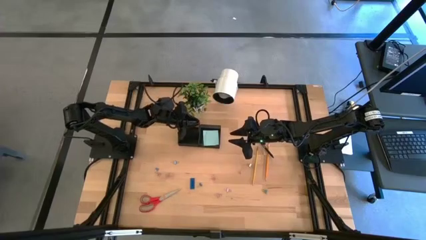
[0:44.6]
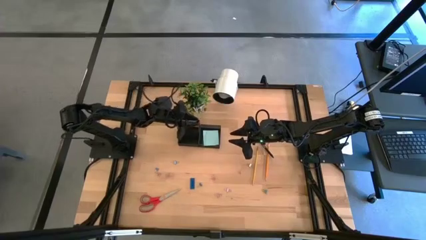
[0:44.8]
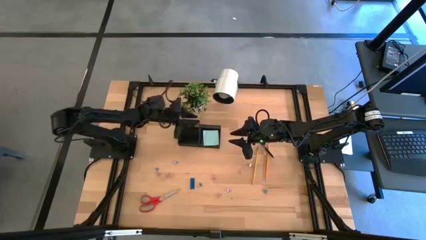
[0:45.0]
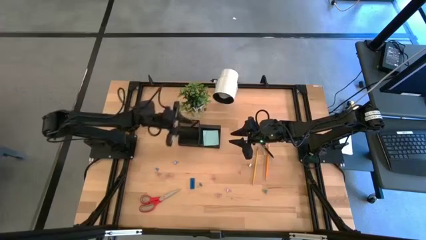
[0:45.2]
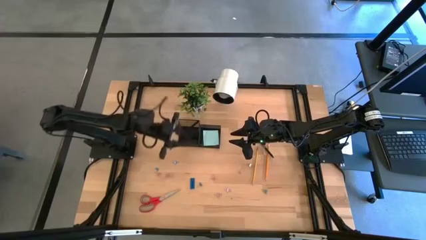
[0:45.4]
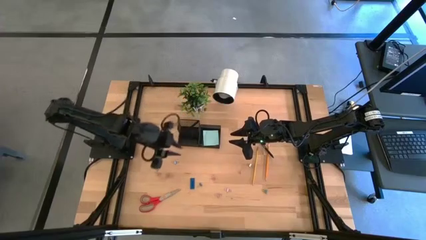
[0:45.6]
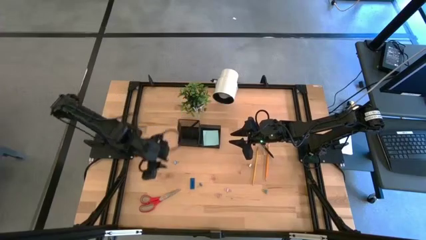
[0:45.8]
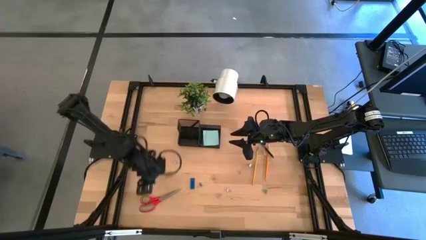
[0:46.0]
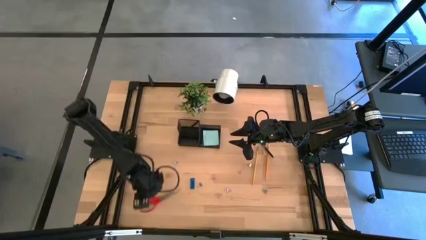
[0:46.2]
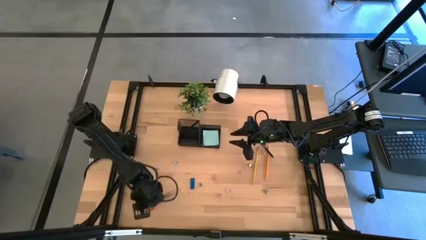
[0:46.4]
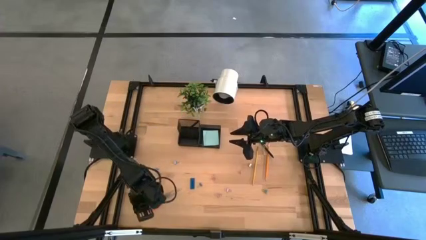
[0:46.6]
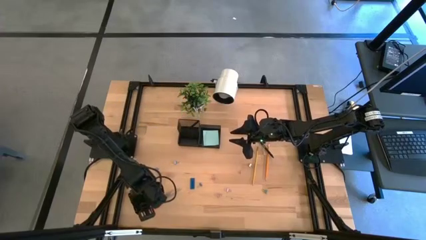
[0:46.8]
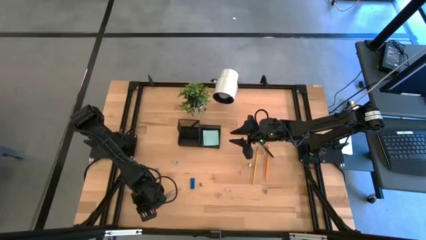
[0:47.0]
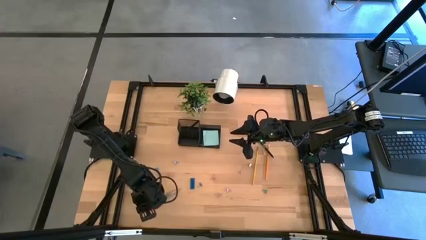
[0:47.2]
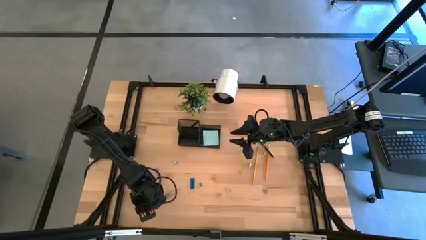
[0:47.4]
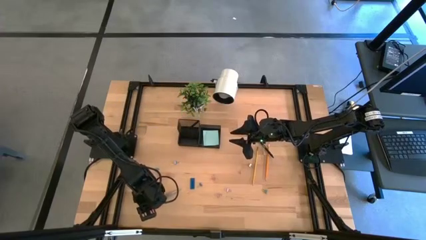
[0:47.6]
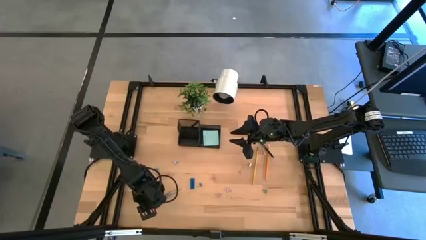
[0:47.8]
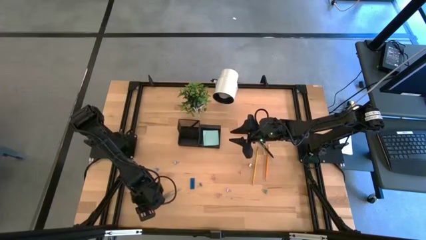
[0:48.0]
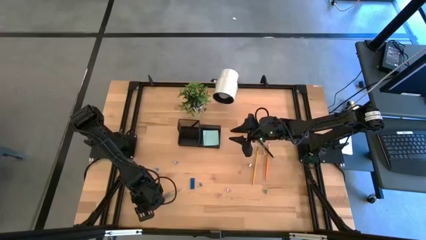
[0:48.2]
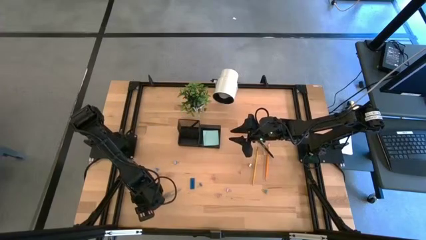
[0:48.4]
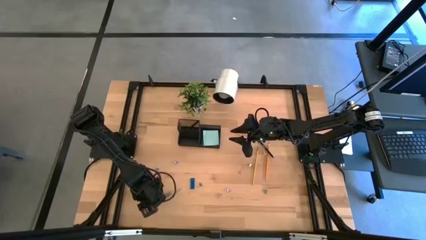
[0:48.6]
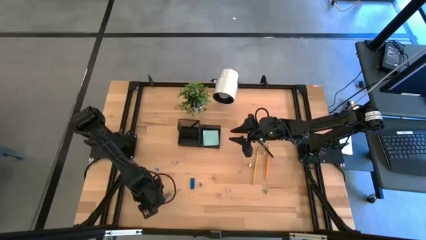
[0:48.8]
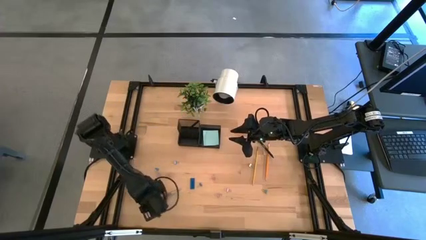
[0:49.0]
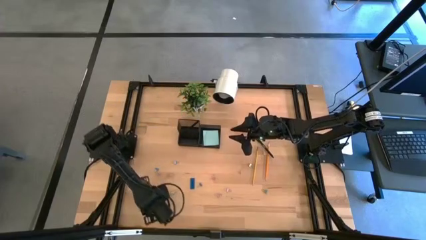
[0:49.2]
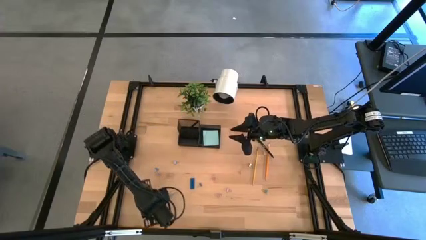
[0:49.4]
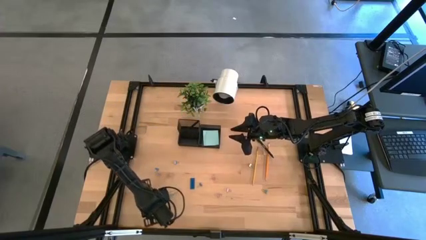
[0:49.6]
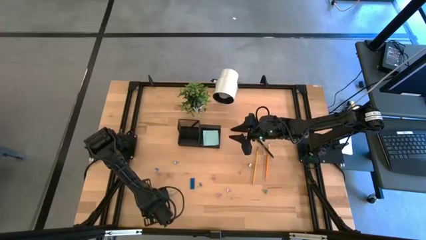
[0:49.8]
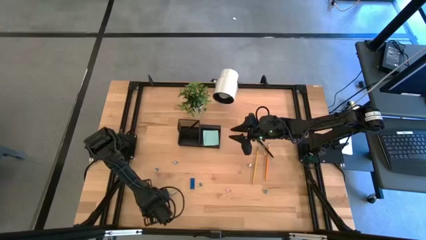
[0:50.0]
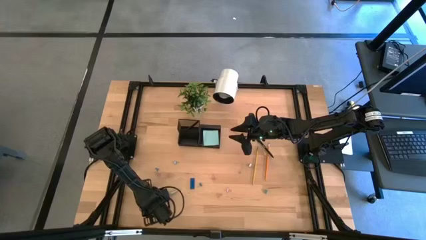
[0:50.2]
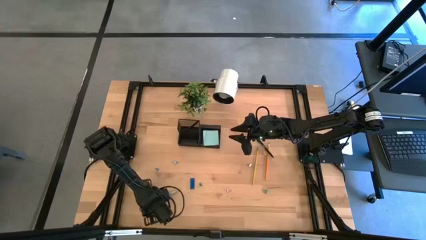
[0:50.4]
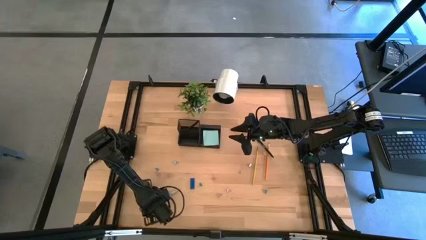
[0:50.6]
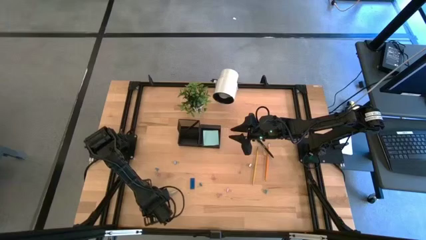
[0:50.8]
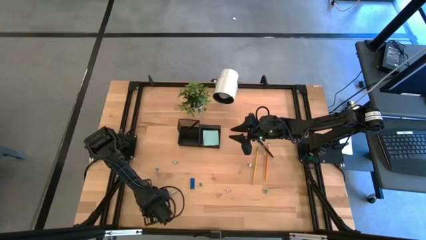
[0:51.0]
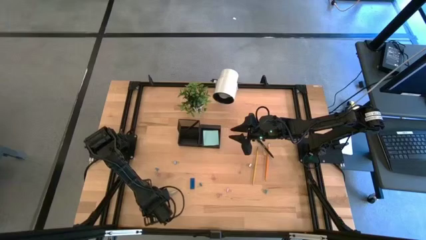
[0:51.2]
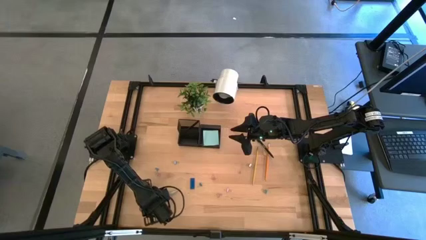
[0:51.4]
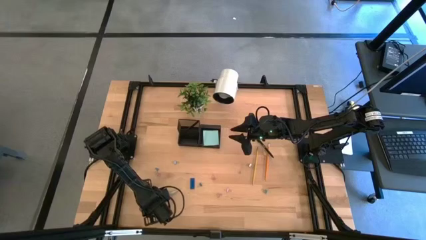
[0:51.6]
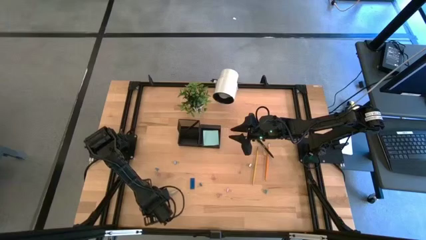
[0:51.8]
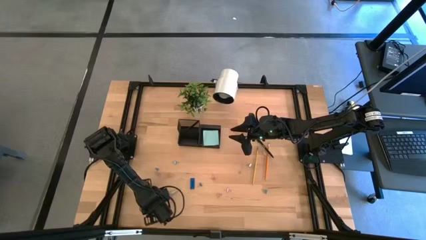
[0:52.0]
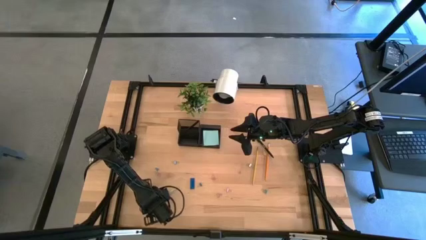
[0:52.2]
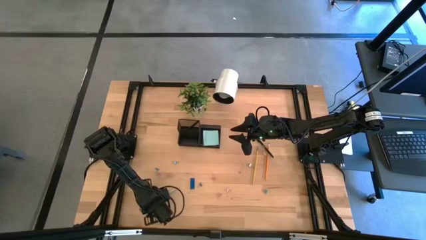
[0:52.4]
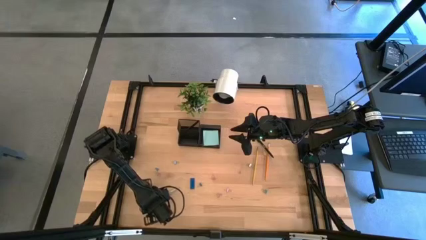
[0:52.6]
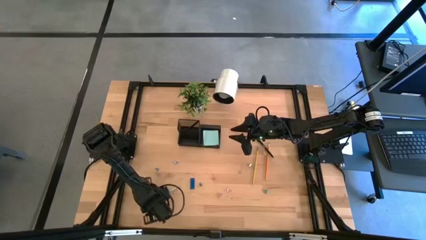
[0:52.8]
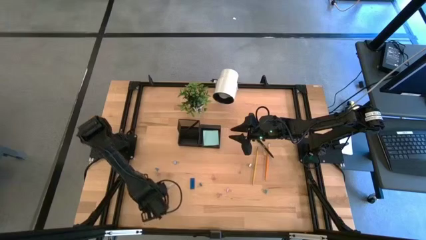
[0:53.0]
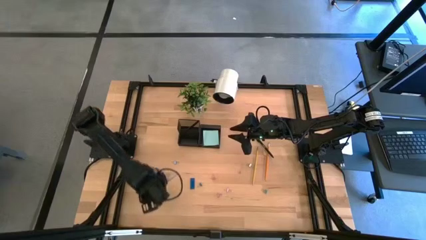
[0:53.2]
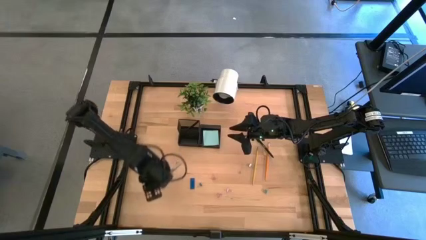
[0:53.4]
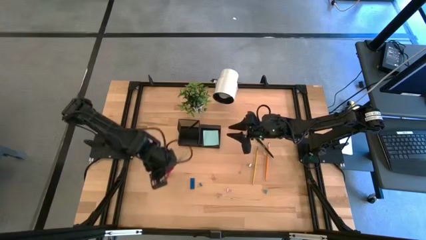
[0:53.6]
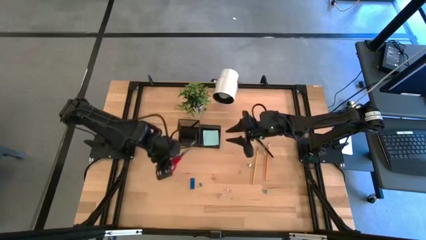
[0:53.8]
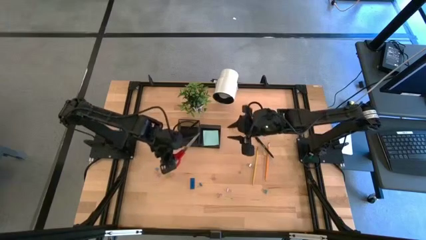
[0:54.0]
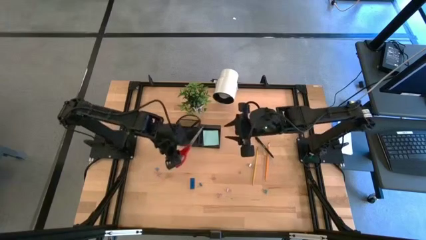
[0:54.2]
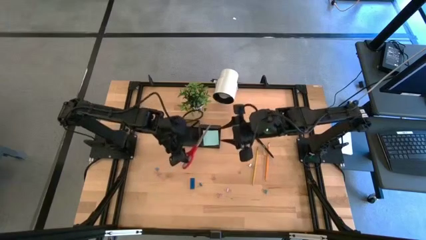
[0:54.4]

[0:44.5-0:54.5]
Task: Pick and place office supplies into organizer
Put the red scissors into the black desk organizer
